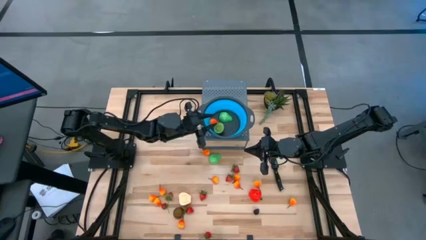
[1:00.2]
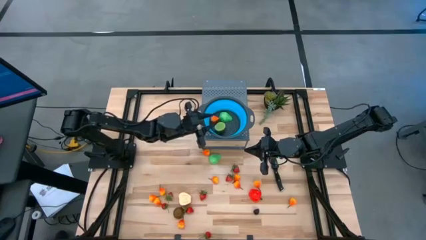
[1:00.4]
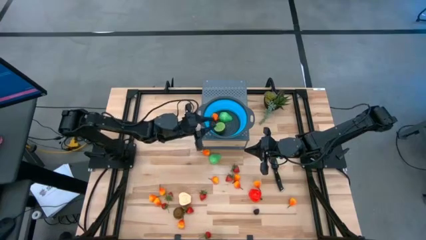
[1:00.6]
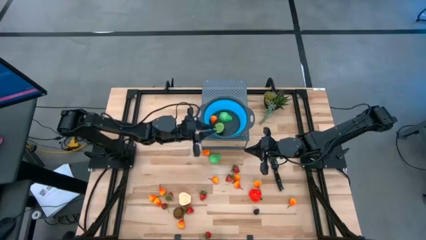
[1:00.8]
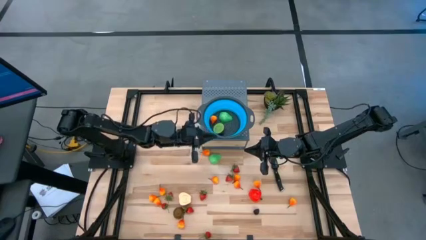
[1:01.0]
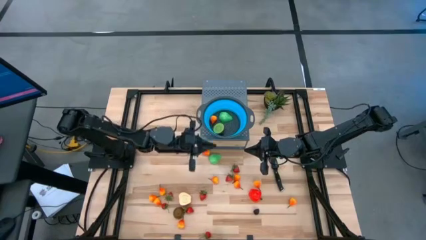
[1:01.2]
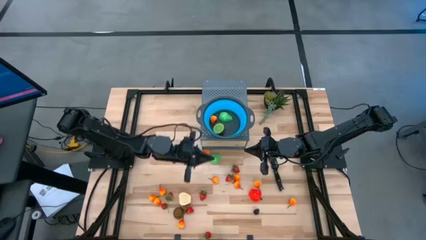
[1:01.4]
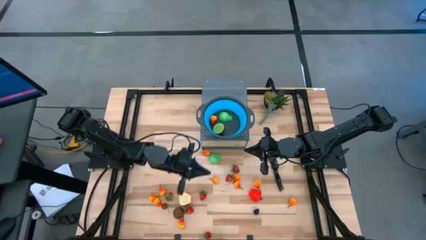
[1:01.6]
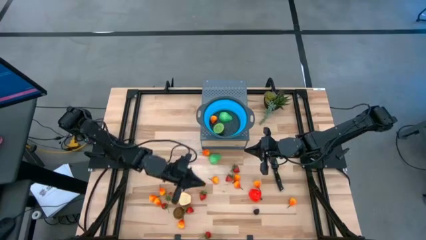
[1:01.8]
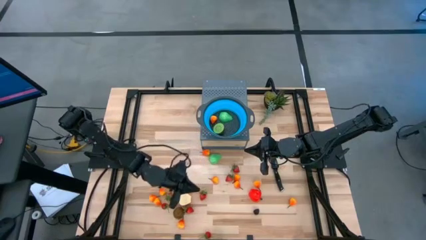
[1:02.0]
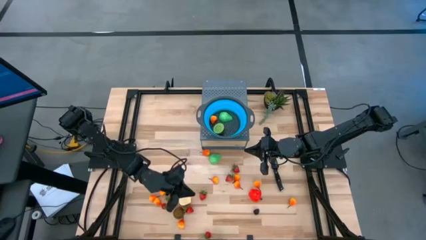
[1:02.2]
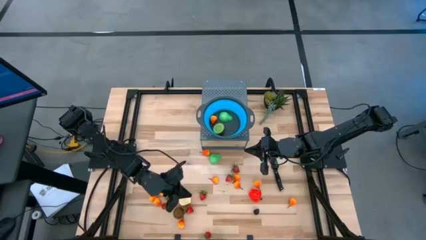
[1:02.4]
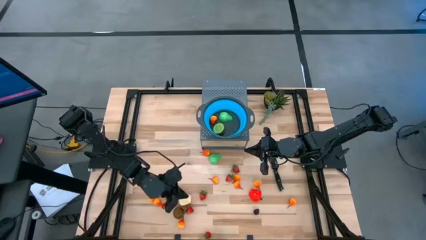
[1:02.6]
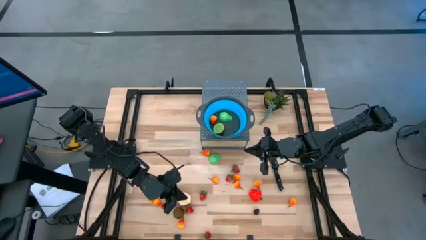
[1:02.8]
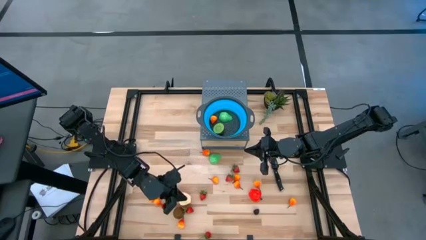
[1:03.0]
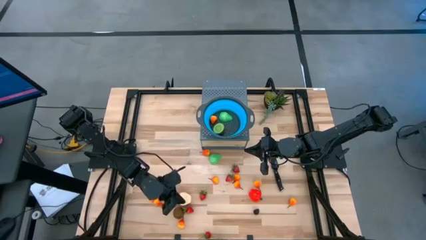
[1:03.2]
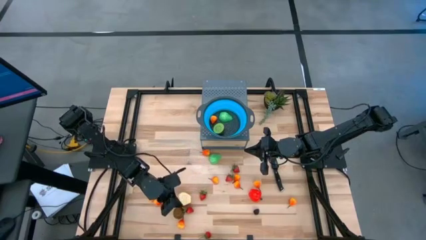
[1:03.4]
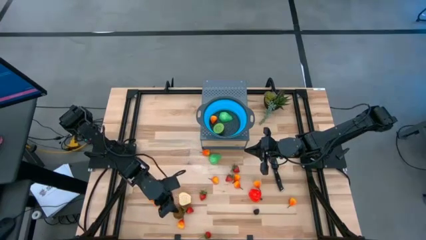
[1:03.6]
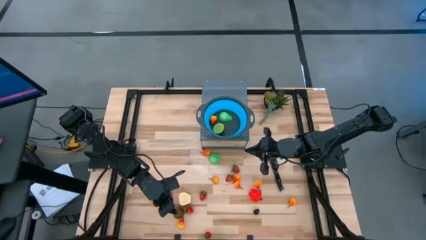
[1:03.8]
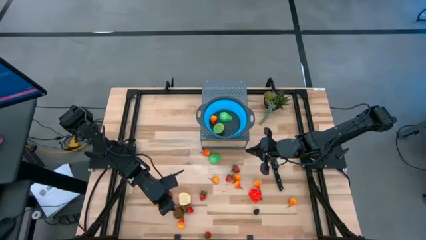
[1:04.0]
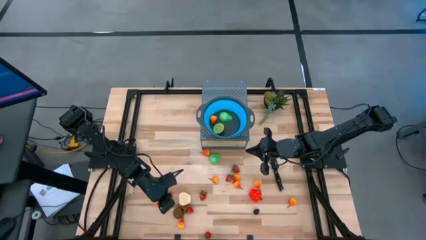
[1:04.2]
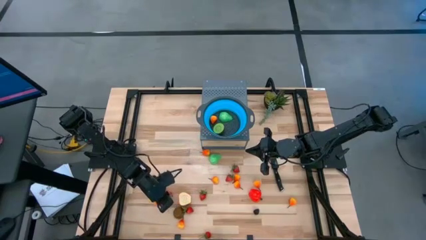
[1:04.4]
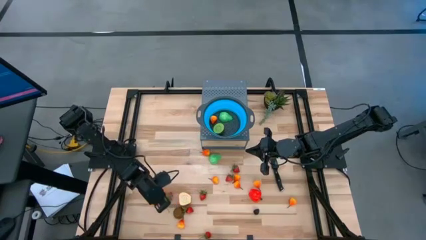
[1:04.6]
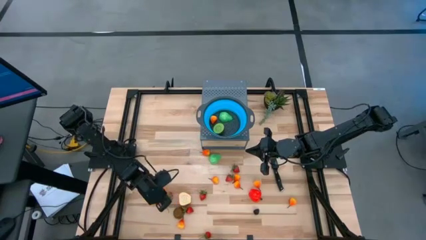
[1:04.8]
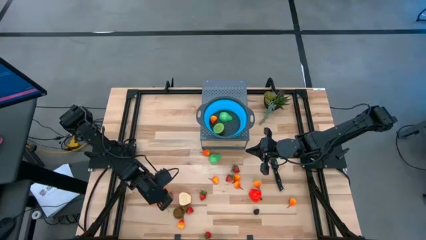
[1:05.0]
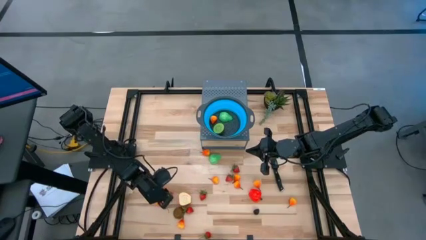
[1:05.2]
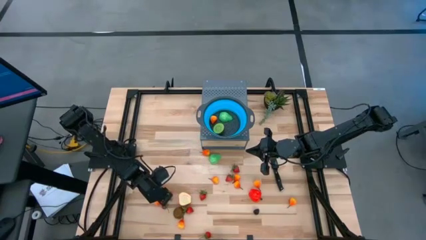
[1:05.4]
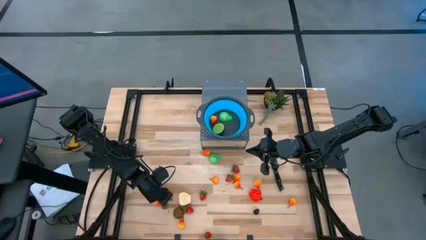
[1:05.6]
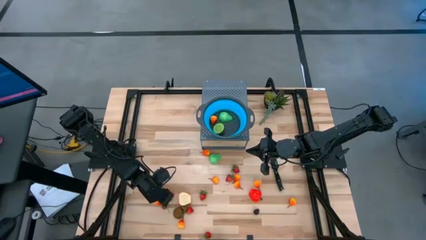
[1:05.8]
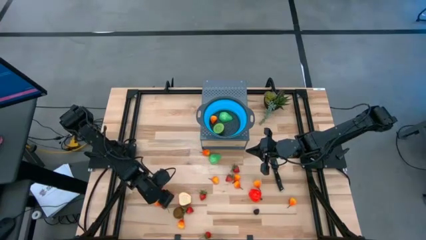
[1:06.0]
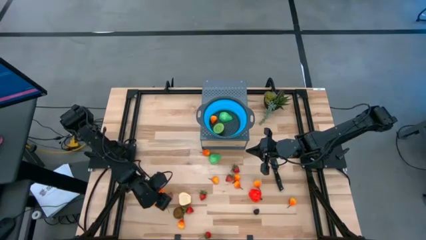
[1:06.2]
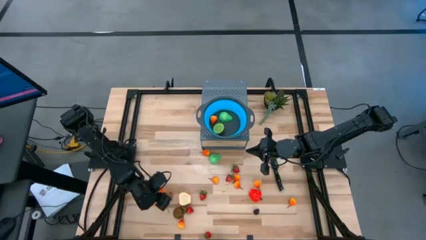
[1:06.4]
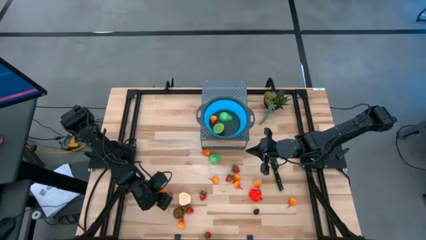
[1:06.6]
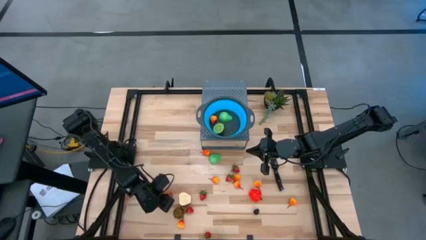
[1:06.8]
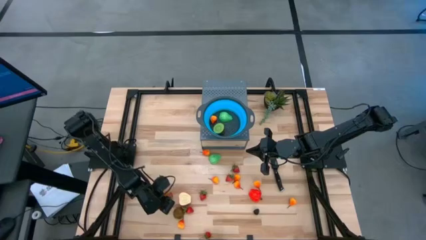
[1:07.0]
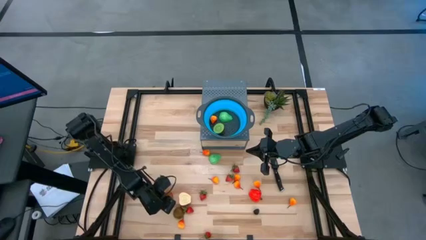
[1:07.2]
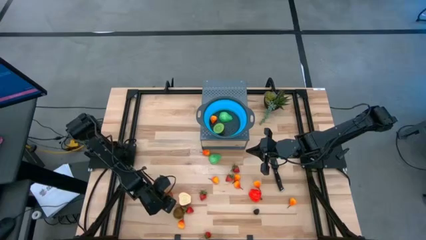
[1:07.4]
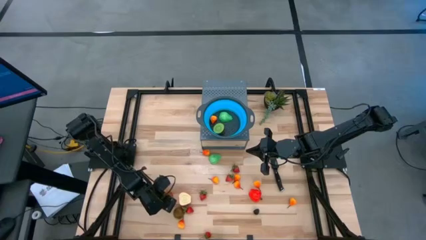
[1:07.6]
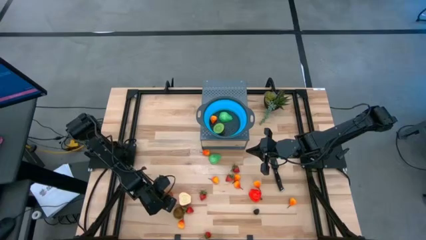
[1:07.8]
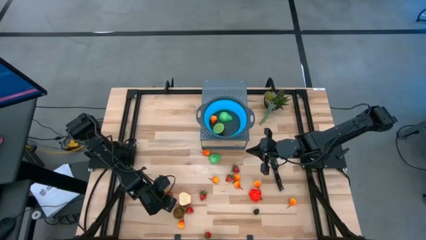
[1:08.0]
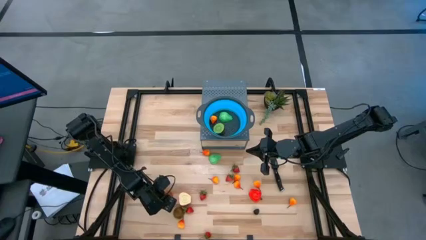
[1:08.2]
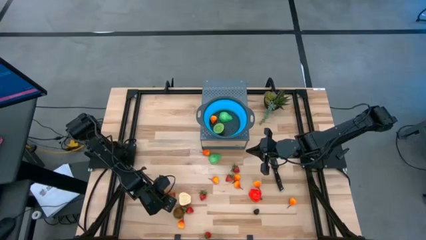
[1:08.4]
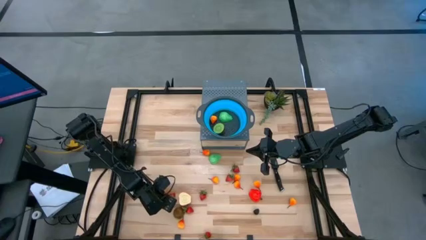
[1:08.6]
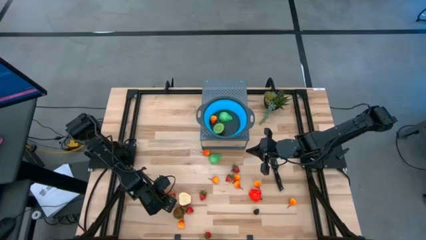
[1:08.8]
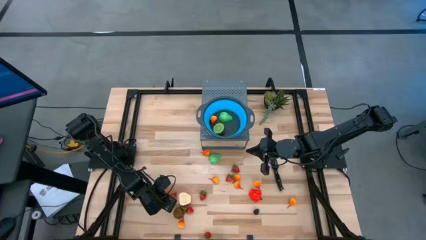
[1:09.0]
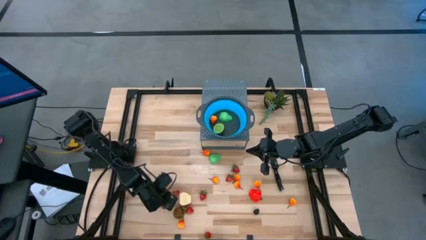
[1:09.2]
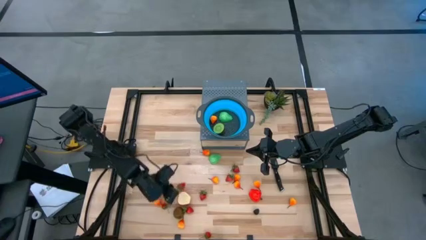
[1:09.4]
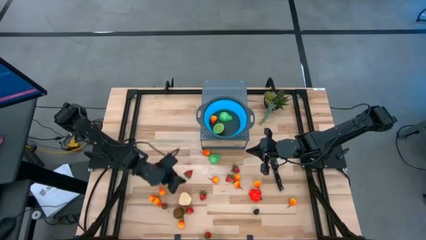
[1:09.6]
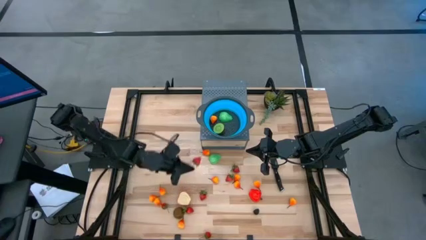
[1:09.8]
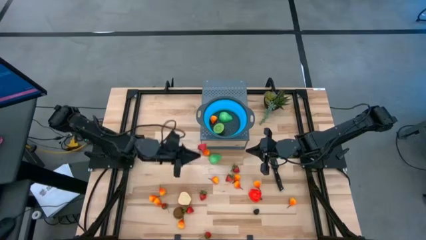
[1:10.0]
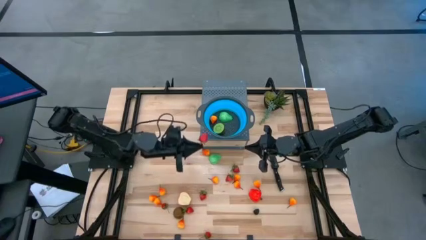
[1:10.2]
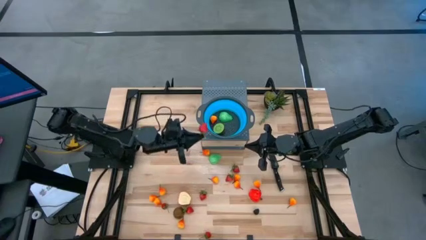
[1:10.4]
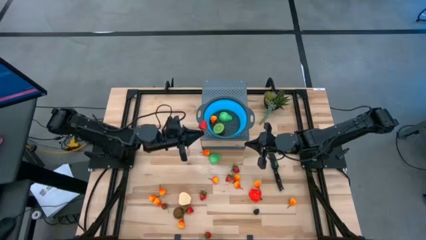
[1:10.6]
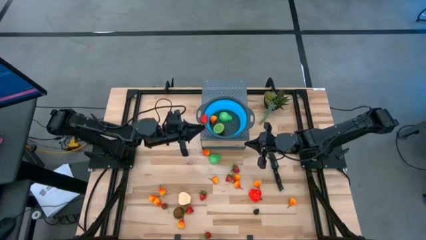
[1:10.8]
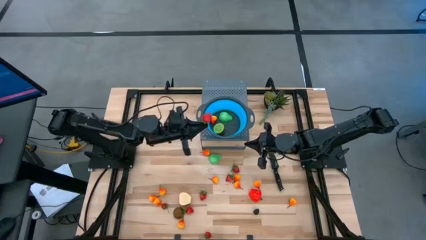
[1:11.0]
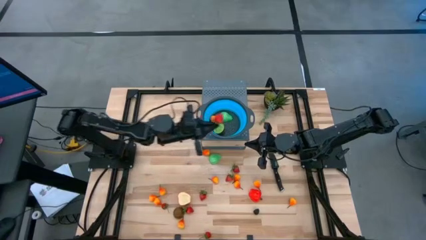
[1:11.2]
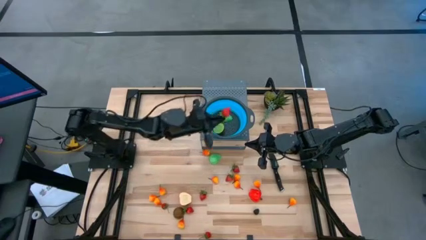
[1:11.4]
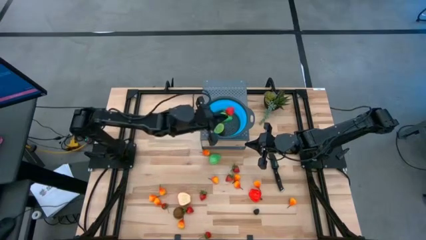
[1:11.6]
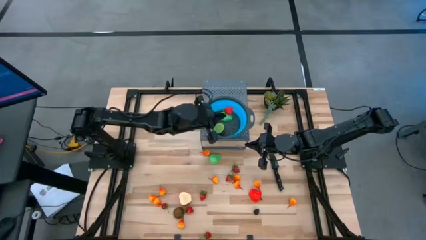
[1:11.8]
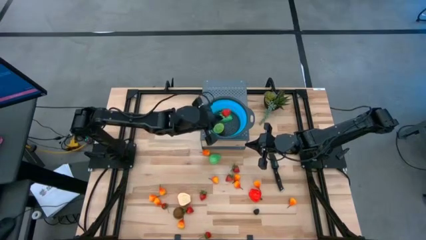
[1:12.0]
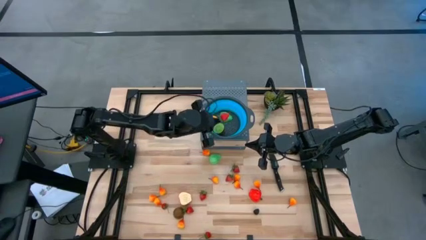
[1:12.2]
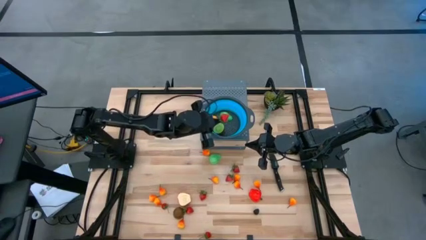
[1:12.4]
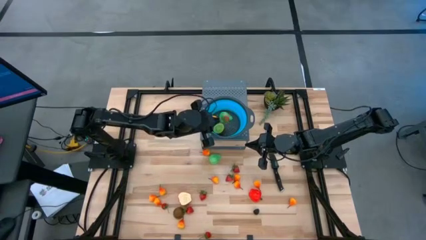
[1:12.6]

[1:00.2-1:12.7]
Task: Pick & Place Fruit
Put the strawberry into the strainer bowl
